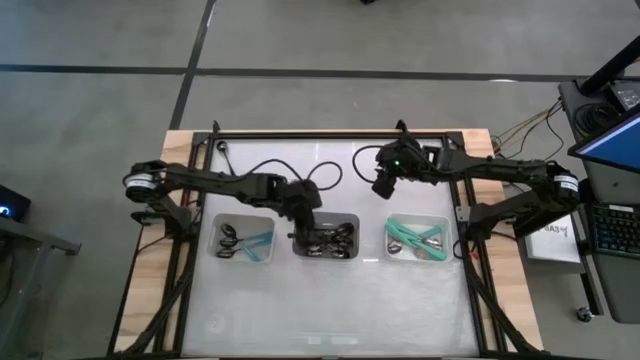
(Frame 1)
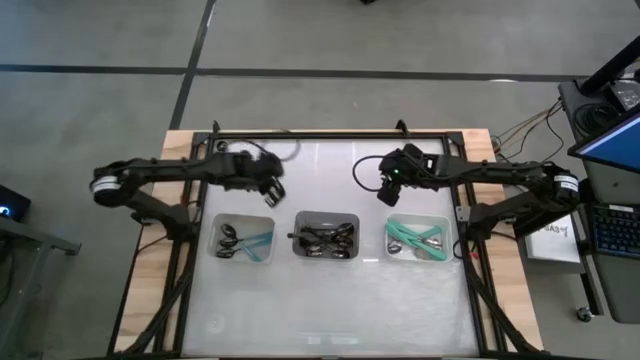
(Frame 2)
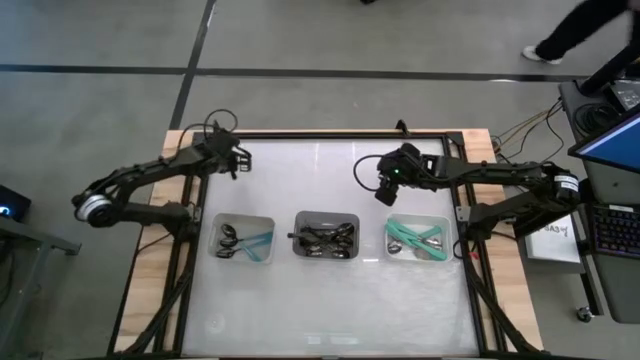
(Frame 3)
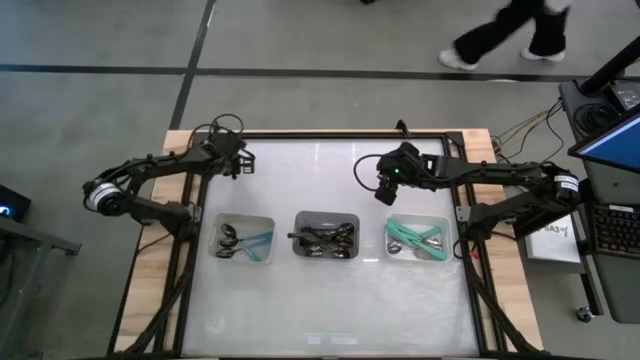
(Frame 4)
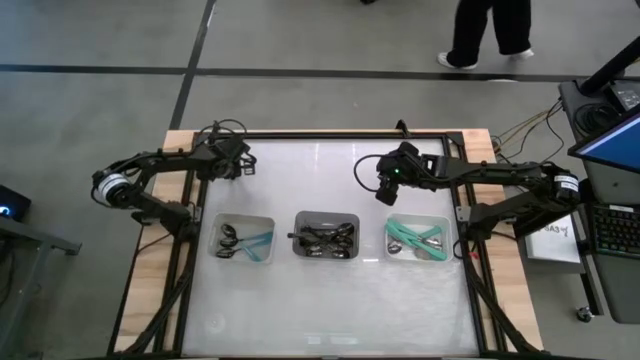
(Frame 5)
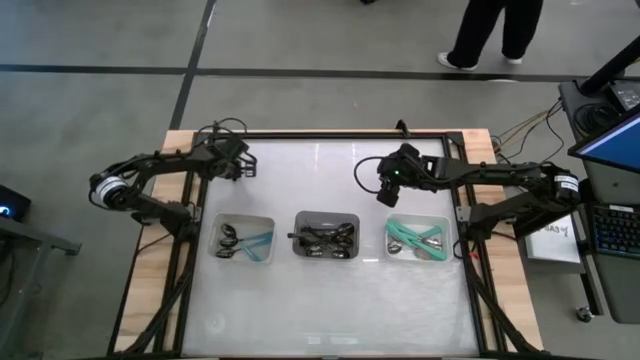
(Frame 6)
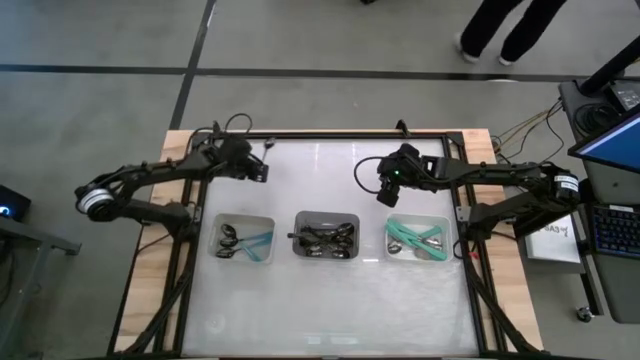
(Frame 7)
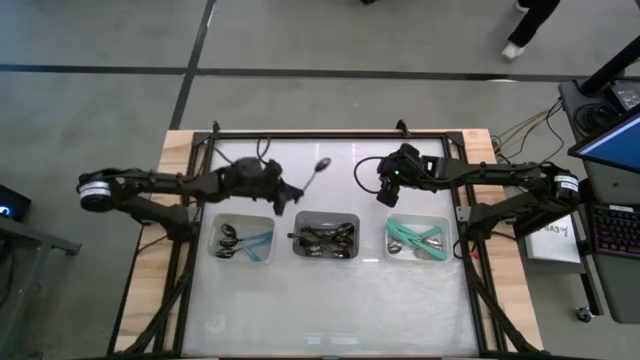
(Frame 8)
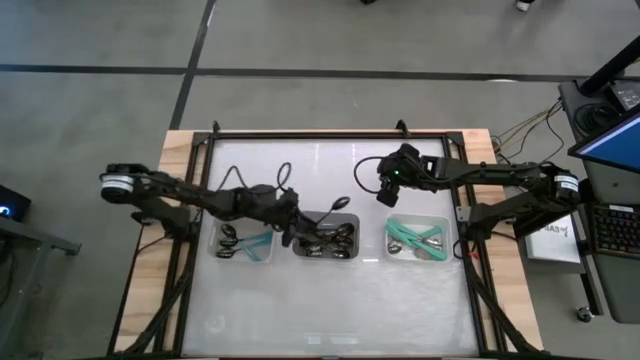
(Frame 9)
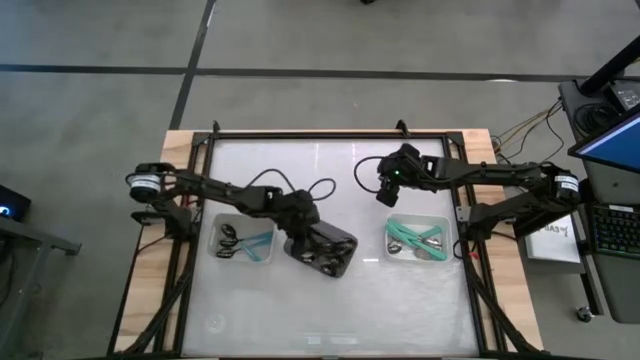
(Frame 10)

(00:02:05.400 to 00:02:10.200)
Task: Sort silverware by color (type)
Put the black spoon into the black bin

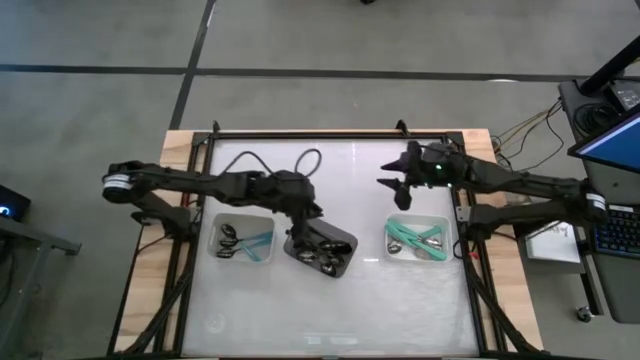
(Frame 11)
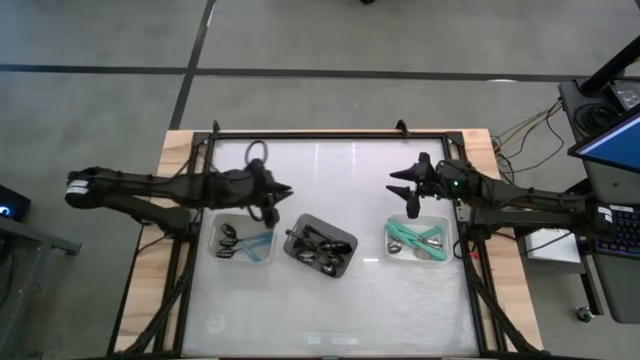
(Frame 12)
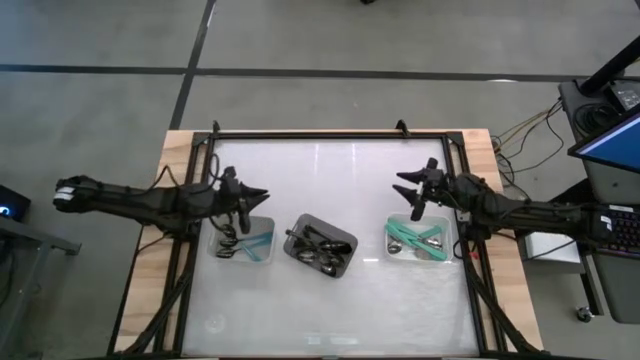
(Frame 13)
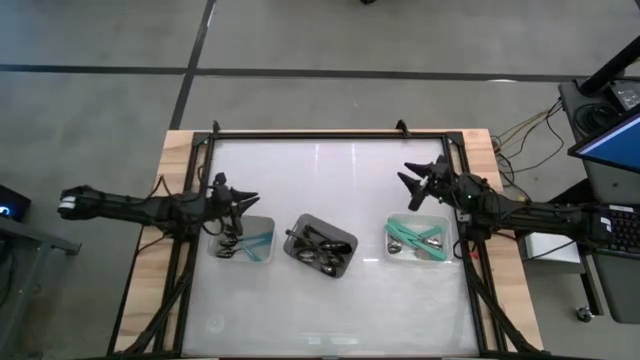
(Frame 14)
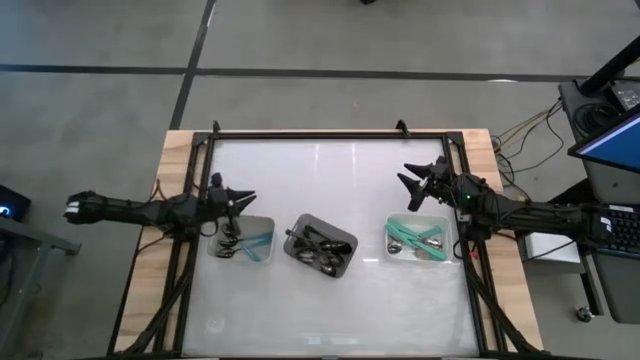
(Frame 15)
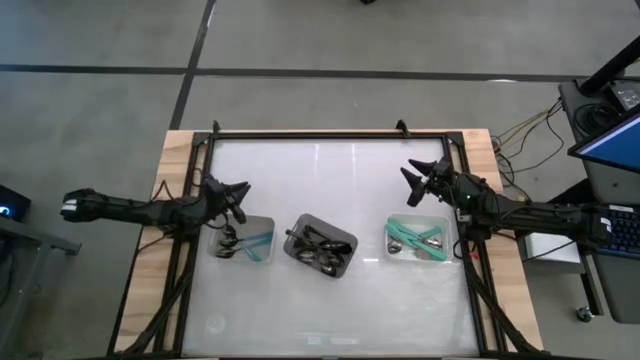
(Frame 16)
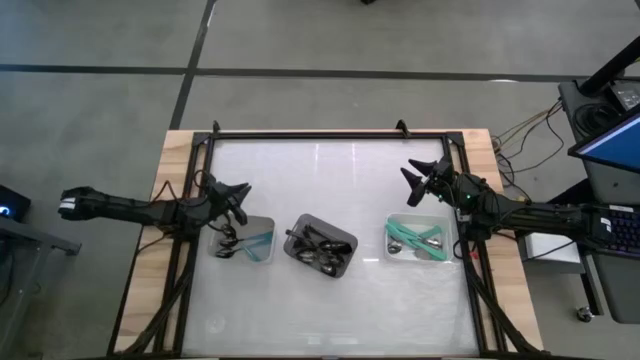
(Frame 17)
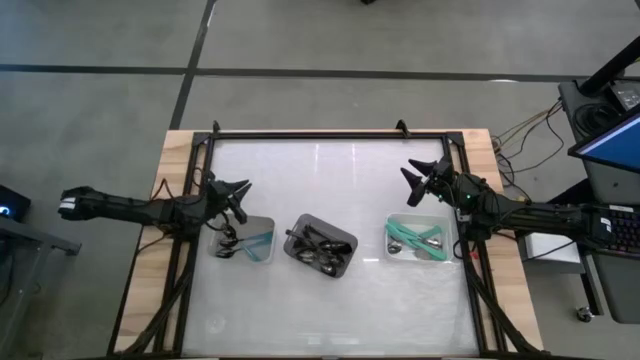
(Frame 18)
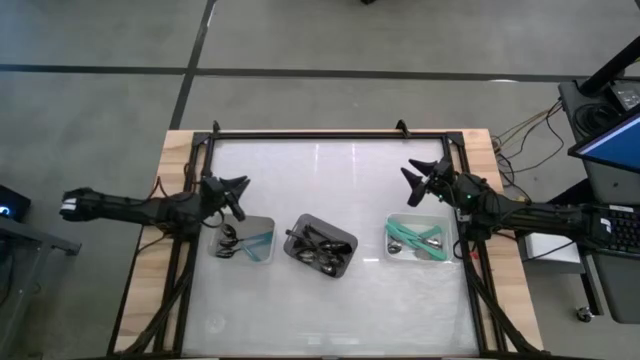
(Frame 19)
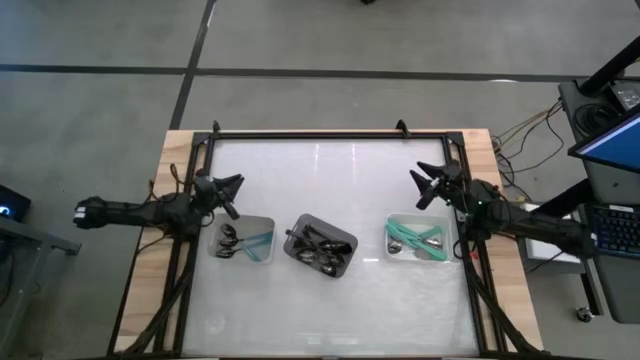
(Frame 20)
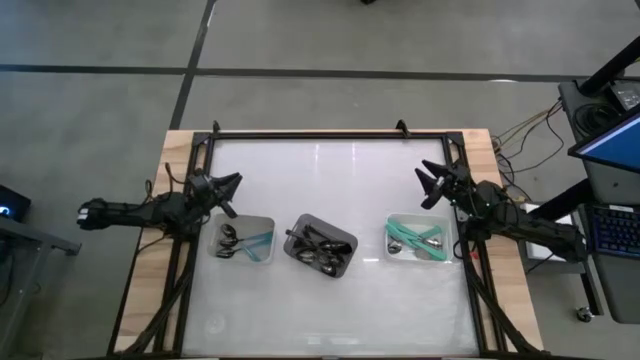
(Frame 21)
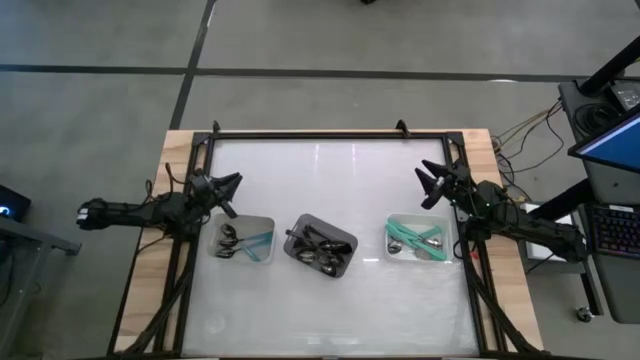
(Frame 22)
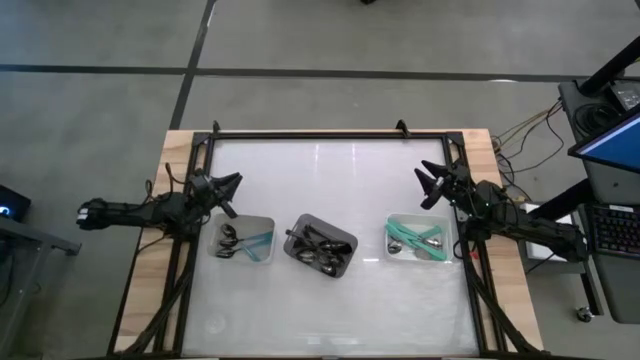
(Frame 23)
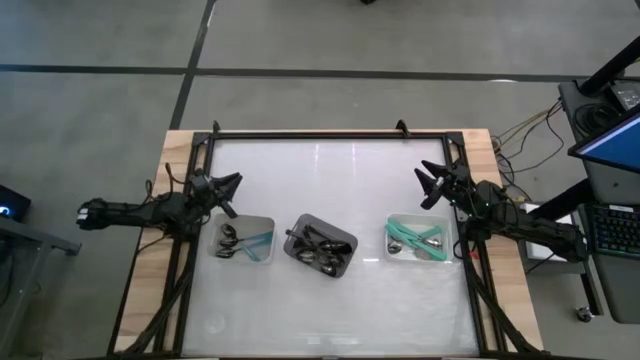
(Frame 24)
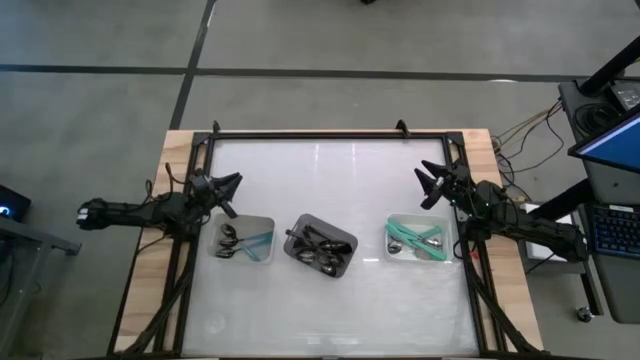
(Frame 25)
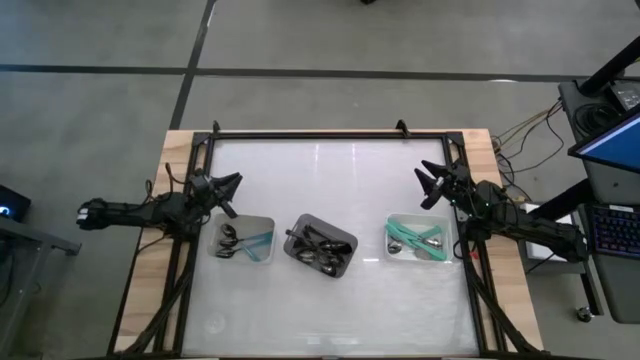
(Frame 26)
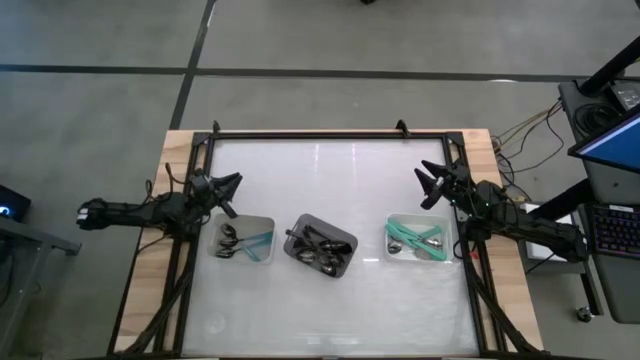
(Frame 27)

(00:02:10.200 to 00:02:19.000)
Return to Home Position

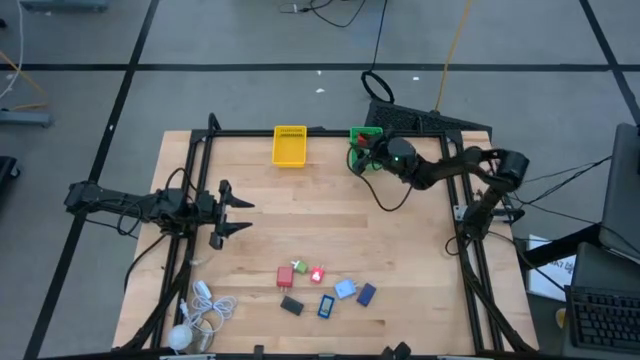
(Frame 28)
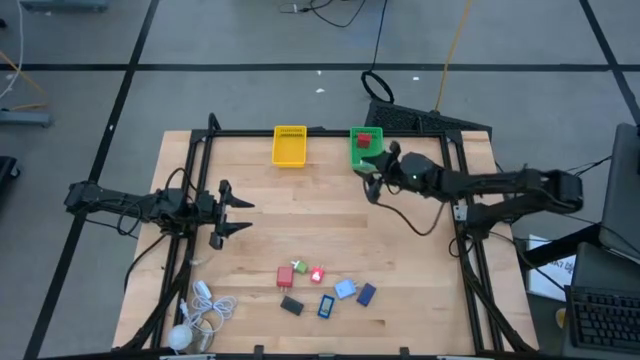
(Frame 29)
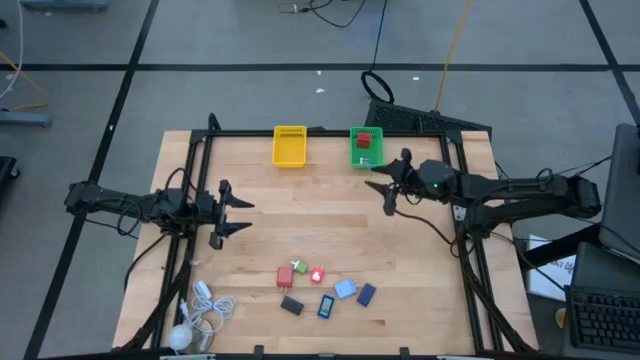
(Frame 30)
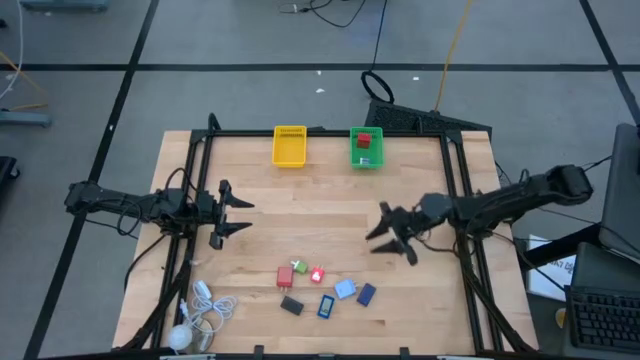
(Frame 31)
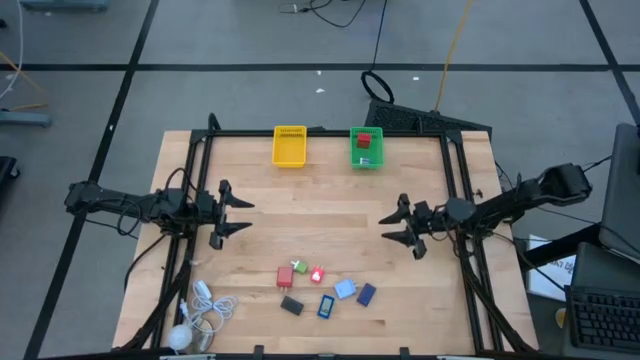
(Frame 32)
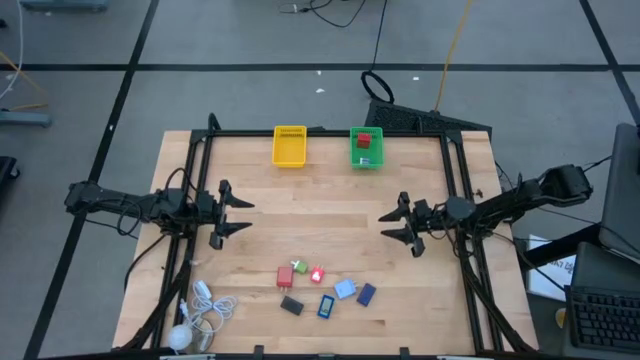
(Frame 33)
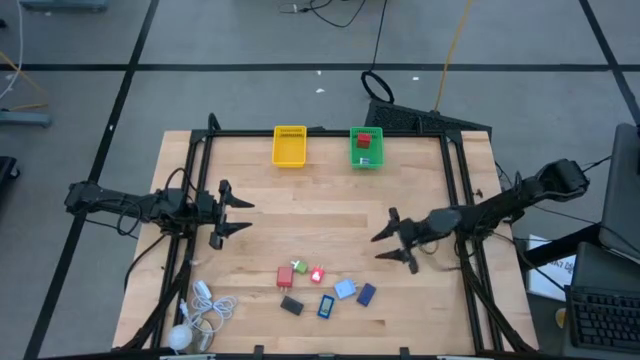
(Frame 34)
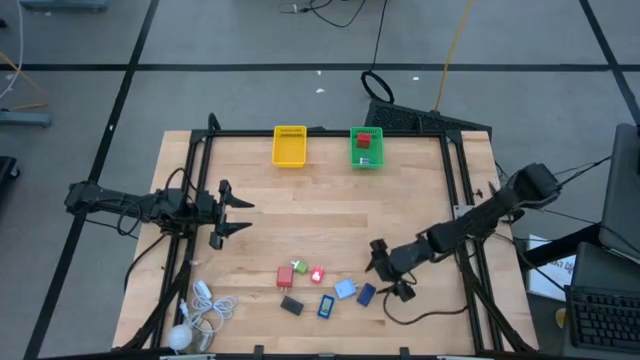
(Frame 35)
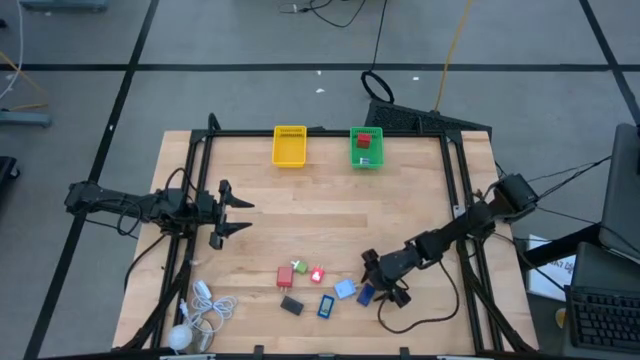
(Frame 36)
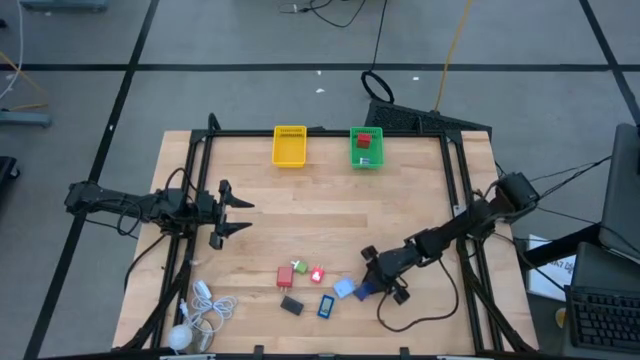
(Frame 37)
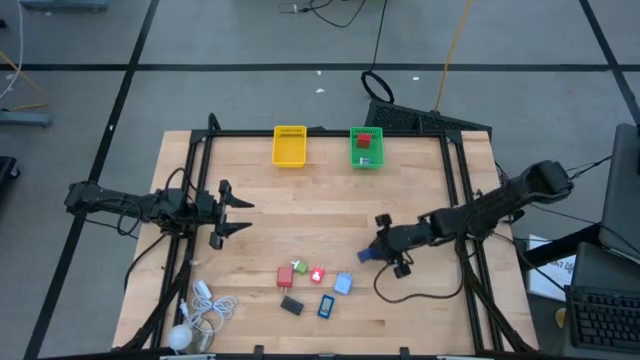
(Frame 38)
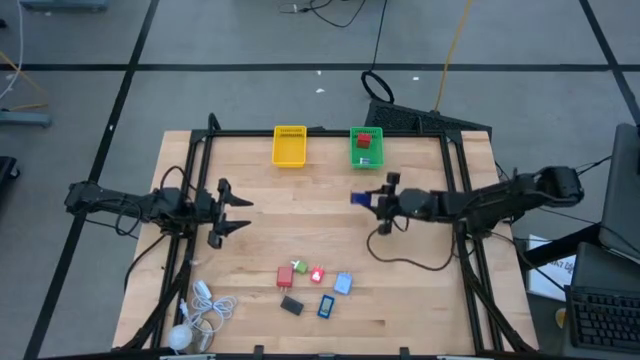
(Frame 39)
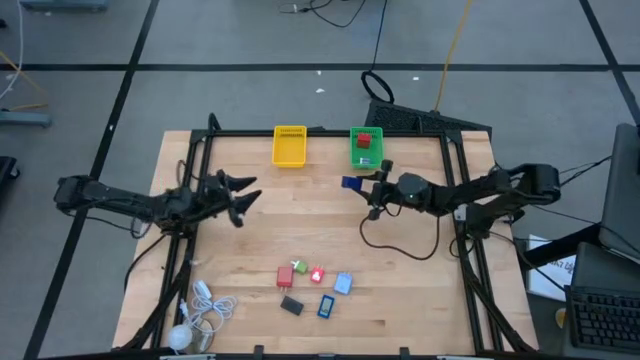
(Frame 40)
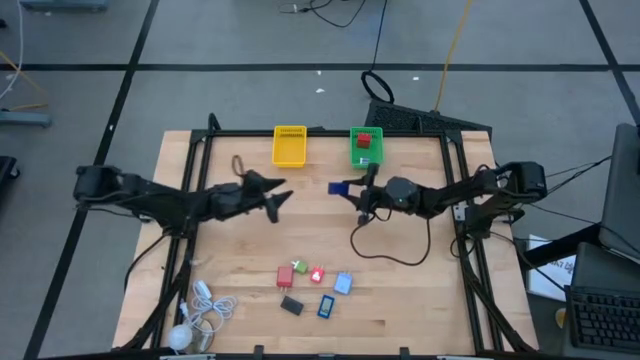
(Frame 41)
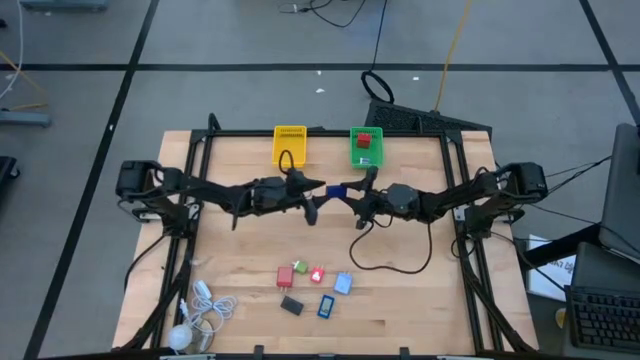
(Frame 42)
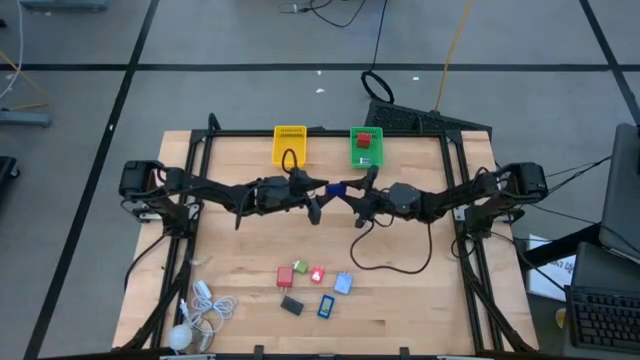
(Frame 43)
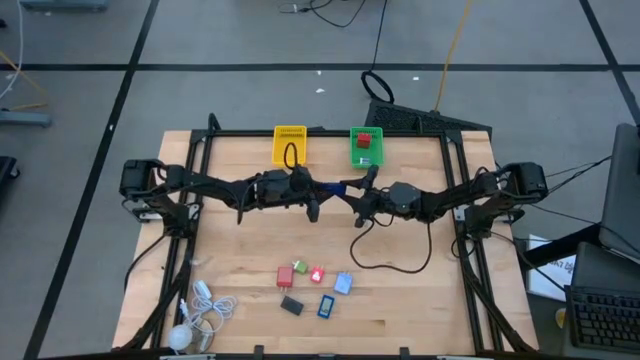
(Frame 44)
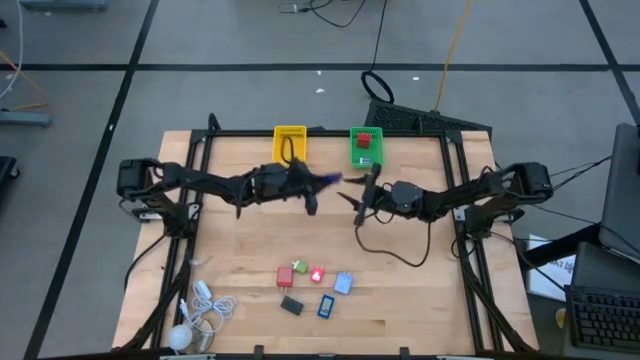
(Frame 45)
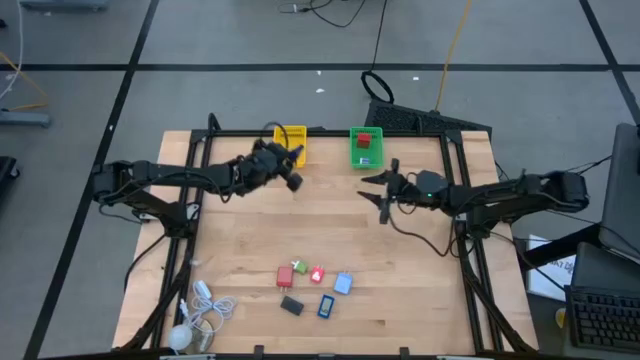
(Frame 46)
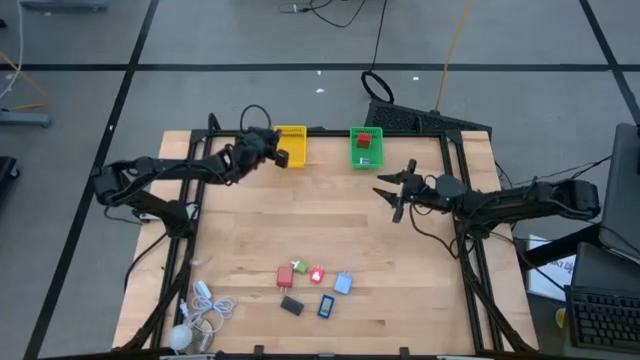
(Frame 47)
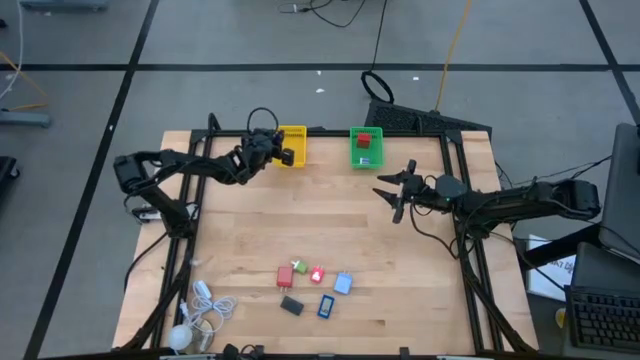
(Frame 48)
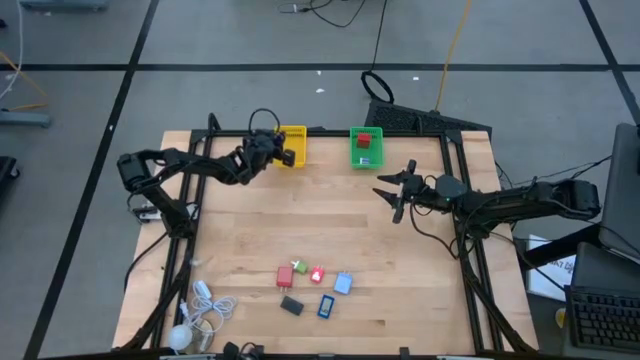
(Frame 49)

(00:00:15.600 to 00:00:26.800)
Task: Pick & Place Office items
Put the right blue digital timer into the yellow bin
